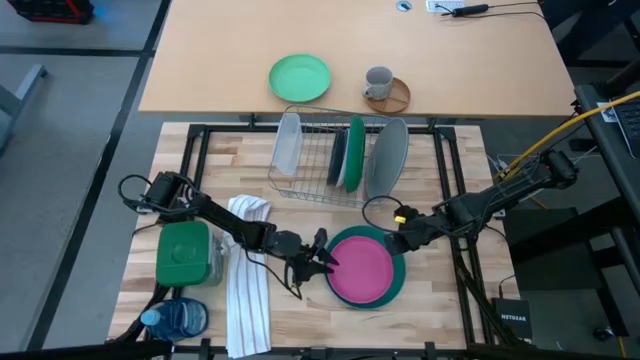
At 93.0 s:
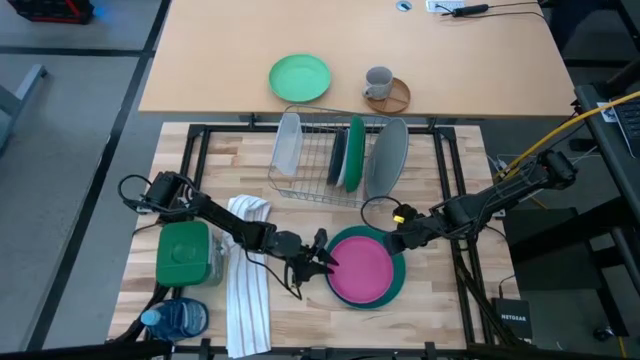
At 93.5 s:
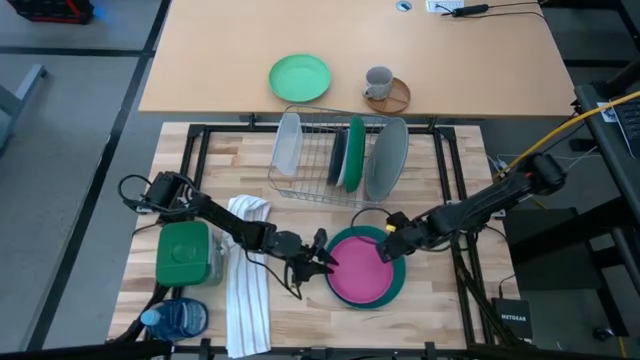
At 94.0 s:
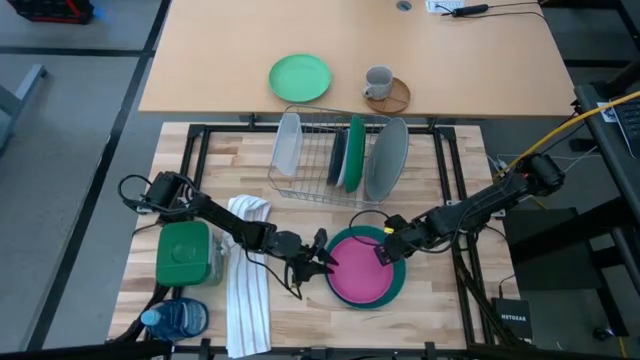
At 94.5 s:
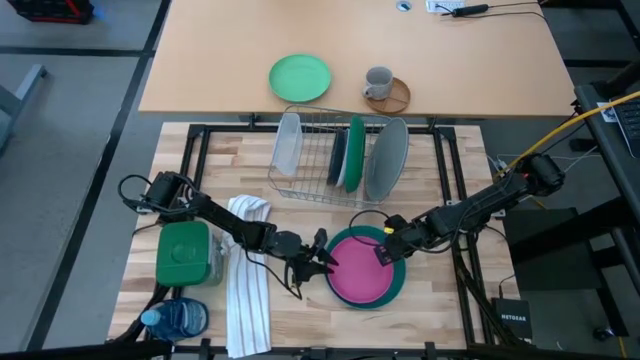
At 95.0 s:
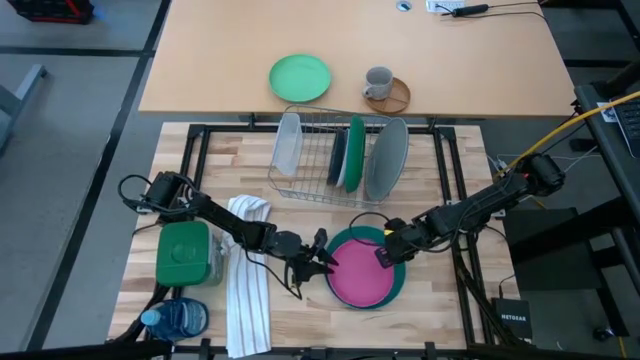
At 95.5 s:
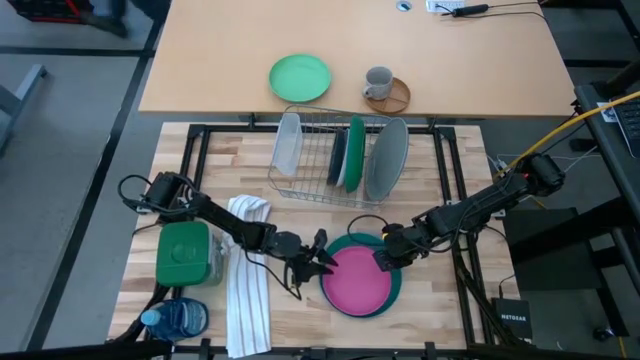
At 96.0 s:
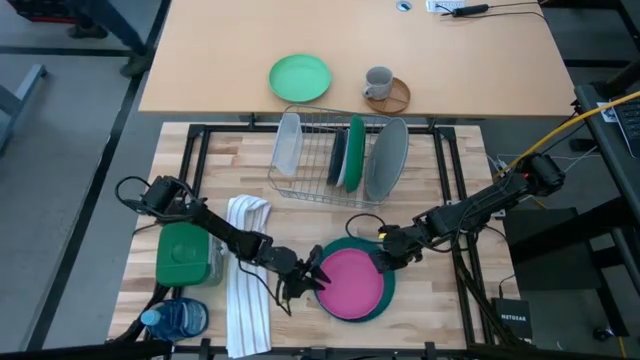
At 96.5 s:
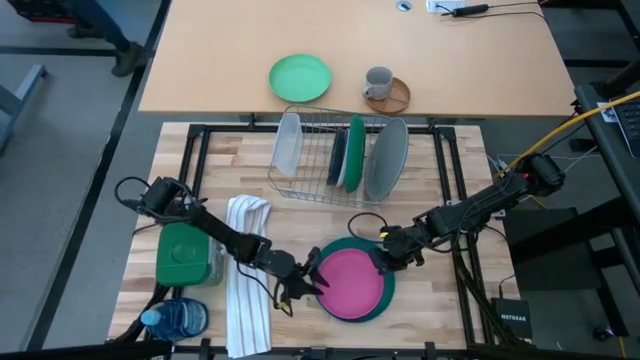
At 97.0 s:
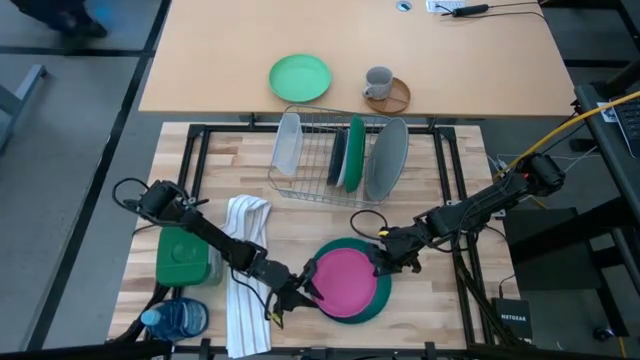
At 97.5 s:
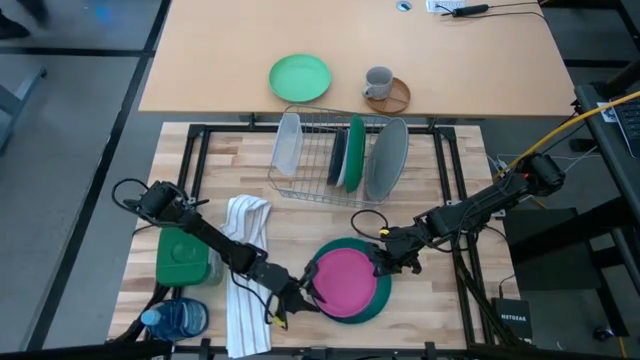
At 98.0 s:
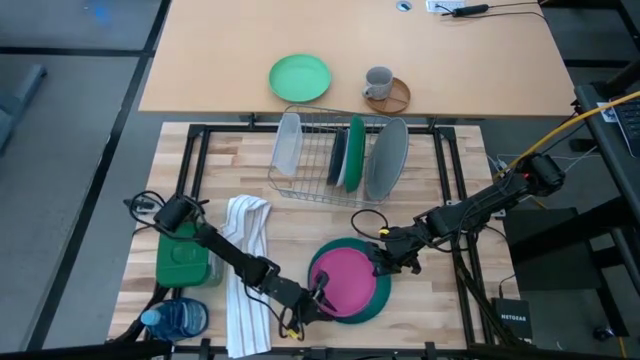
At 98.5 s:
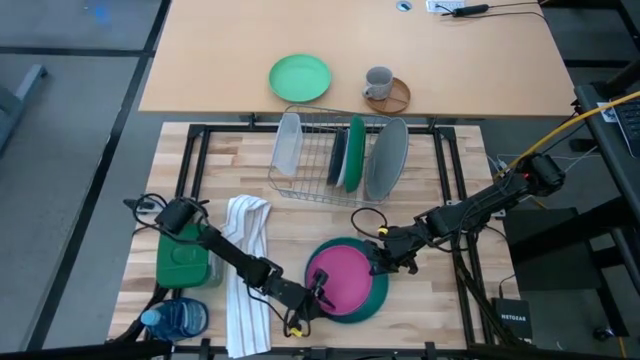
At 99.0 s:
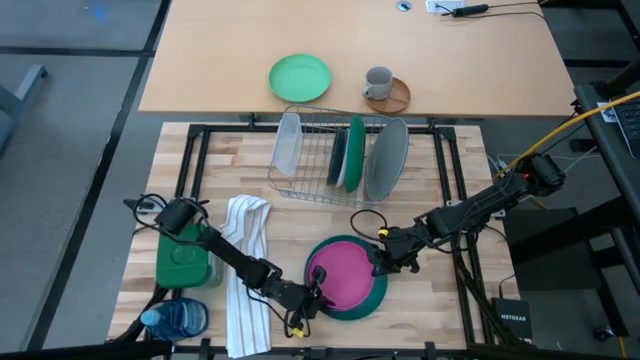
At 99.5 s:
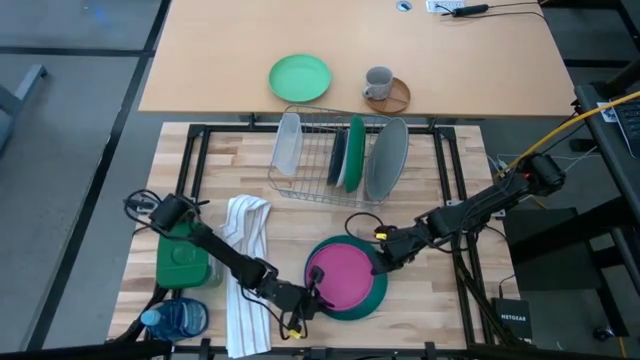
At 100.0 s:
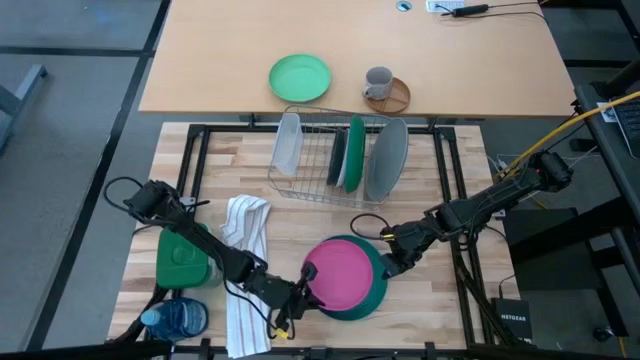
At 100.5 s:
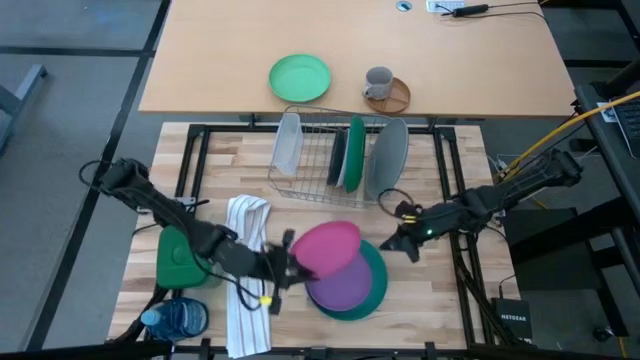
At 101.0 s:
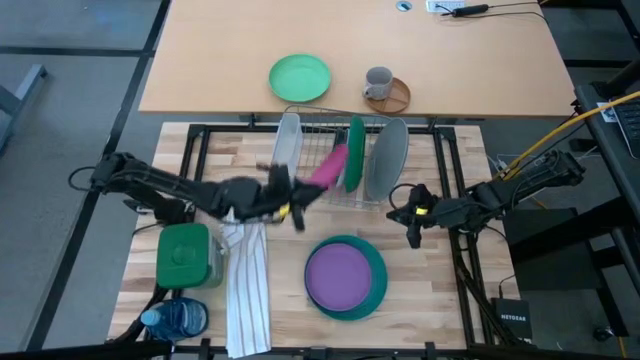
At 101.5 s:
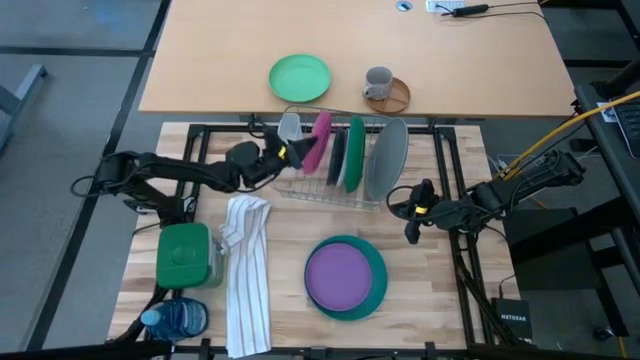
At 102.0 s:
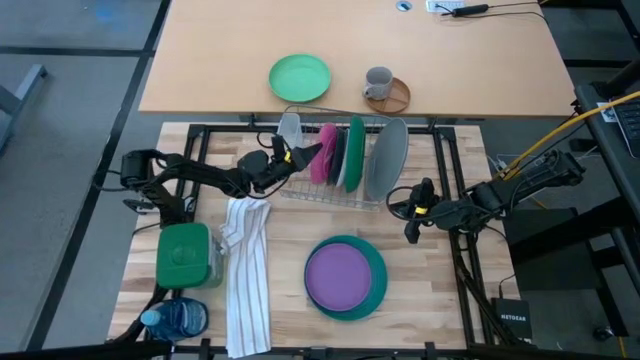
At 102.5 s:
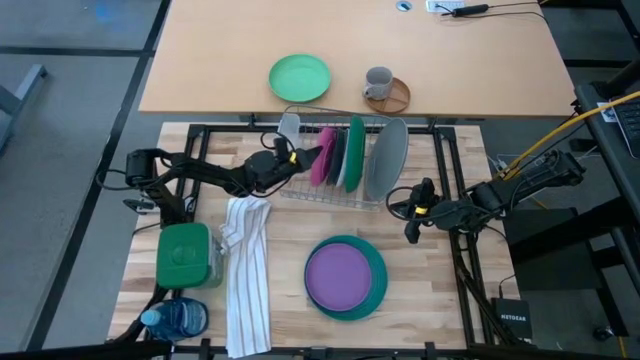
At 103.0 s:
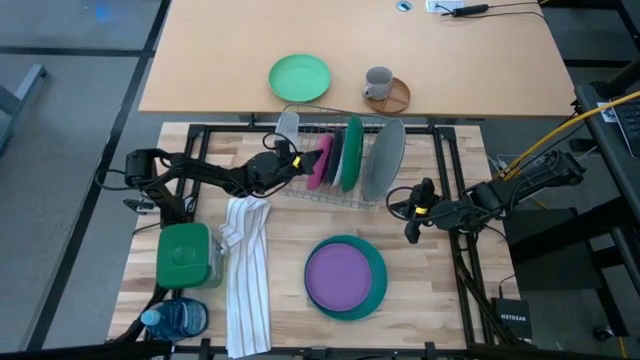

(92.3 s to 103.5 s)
Task: Sort dishes
Put the pink plate in the dish rack

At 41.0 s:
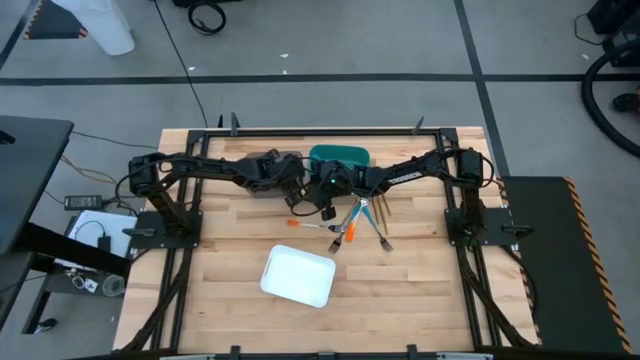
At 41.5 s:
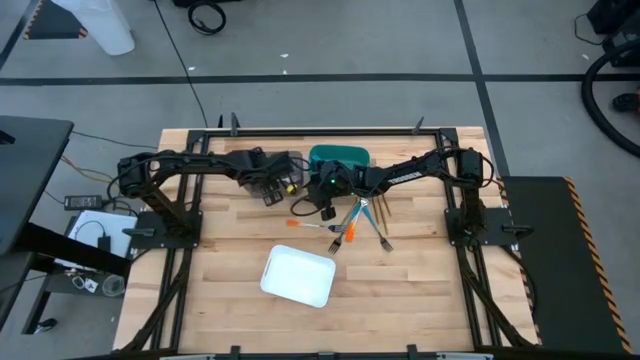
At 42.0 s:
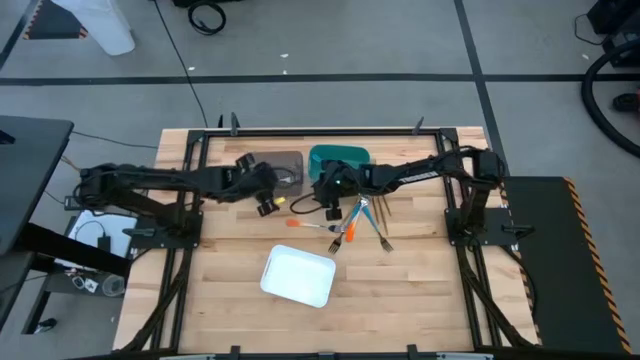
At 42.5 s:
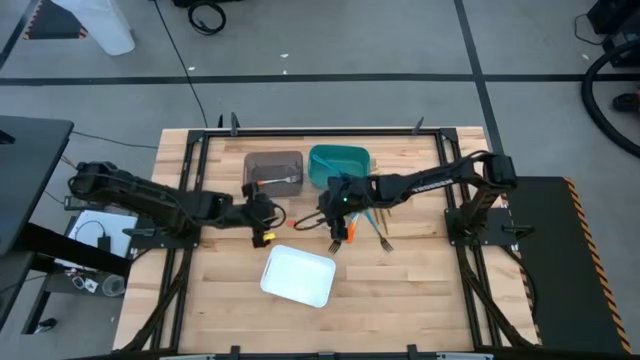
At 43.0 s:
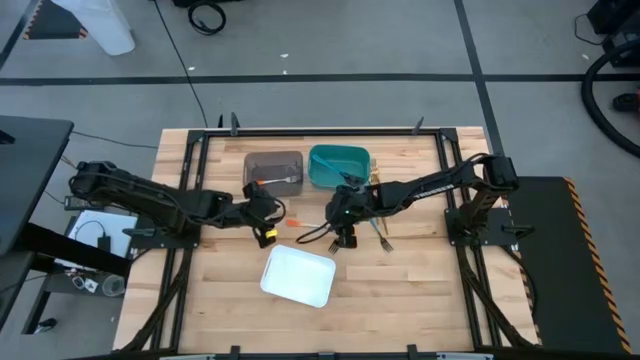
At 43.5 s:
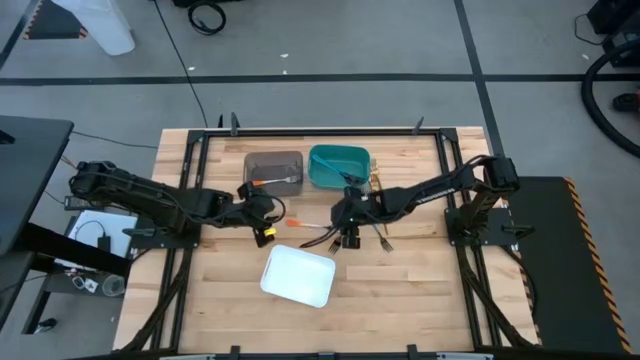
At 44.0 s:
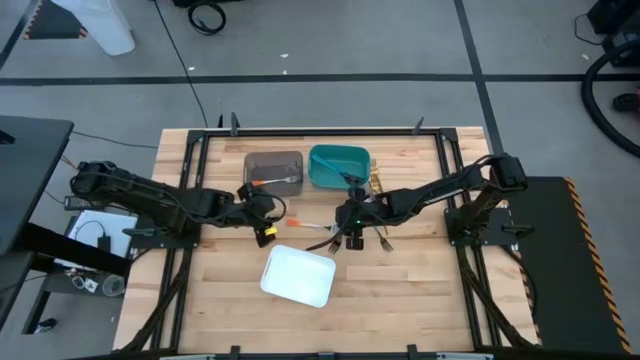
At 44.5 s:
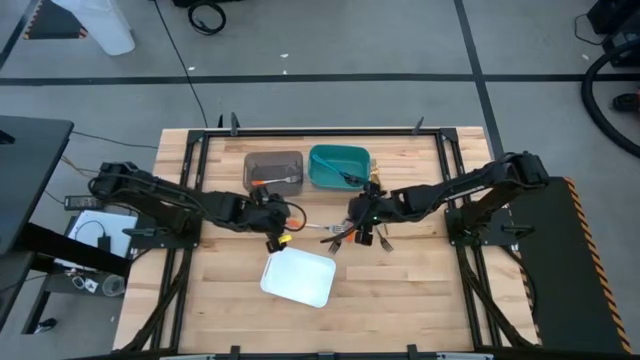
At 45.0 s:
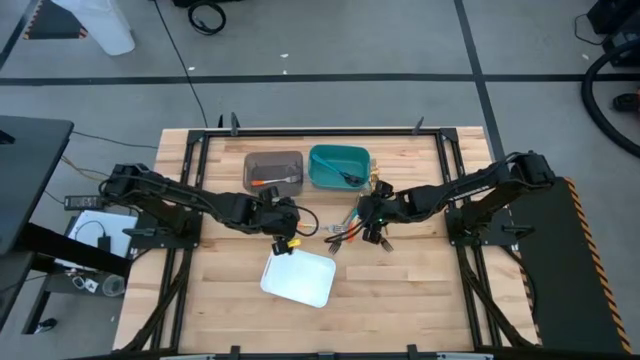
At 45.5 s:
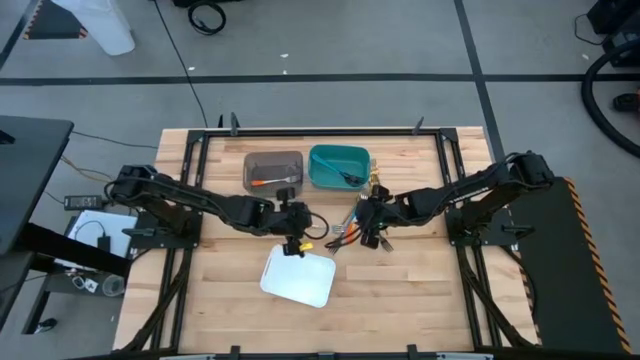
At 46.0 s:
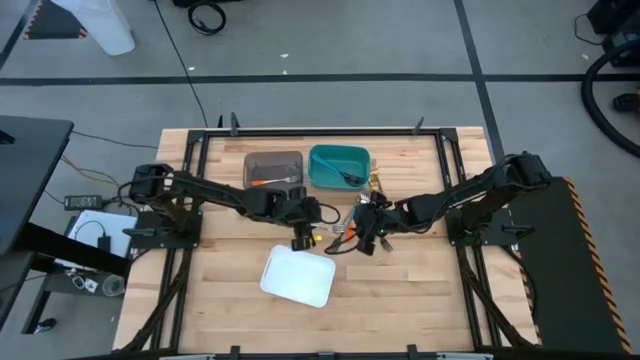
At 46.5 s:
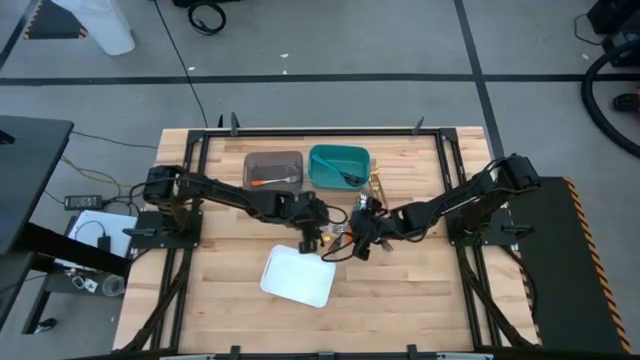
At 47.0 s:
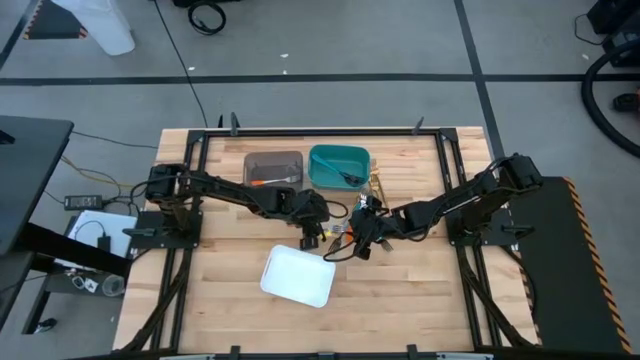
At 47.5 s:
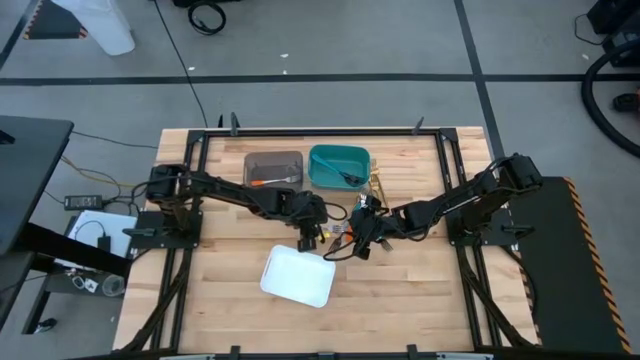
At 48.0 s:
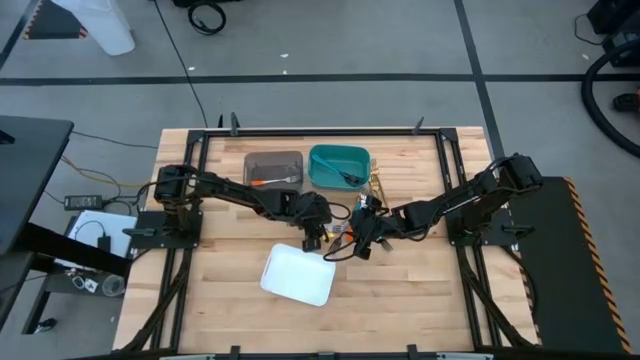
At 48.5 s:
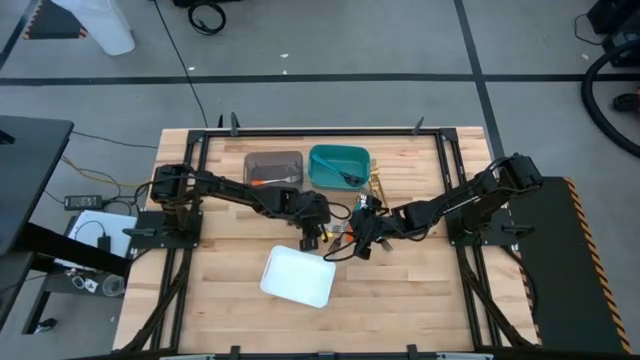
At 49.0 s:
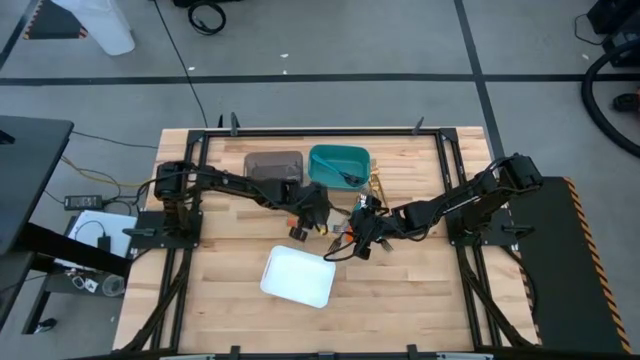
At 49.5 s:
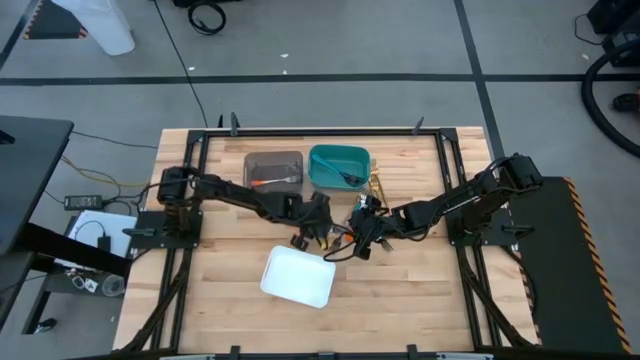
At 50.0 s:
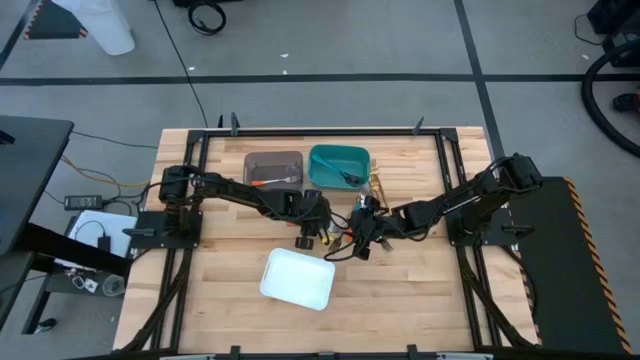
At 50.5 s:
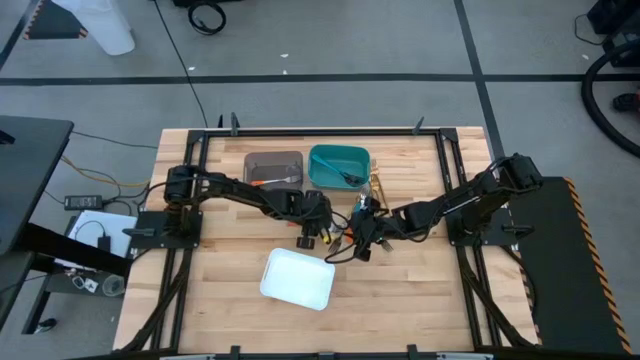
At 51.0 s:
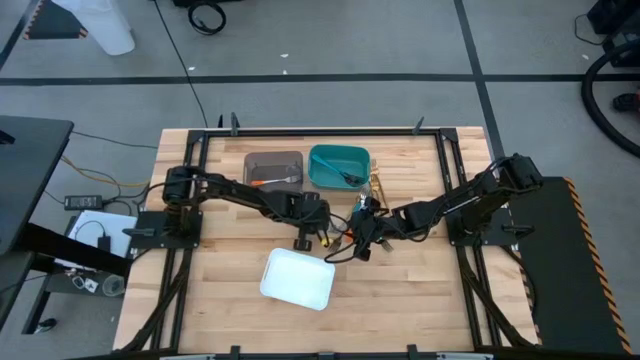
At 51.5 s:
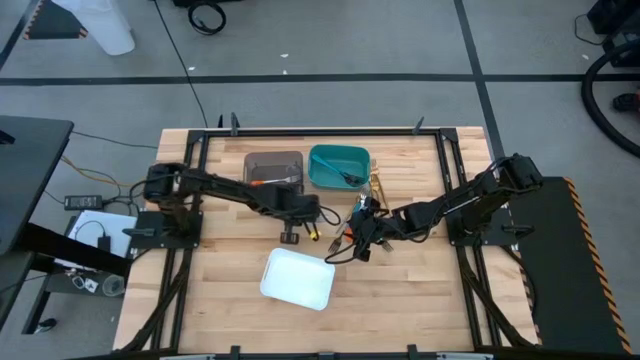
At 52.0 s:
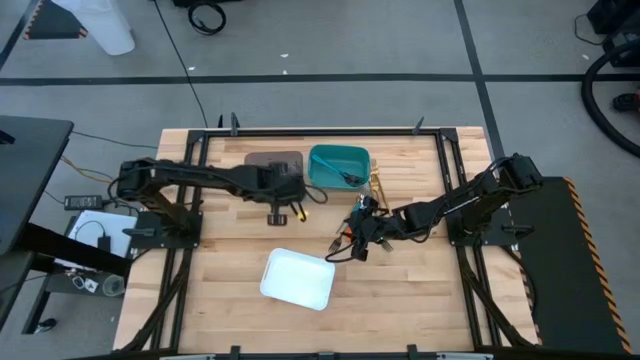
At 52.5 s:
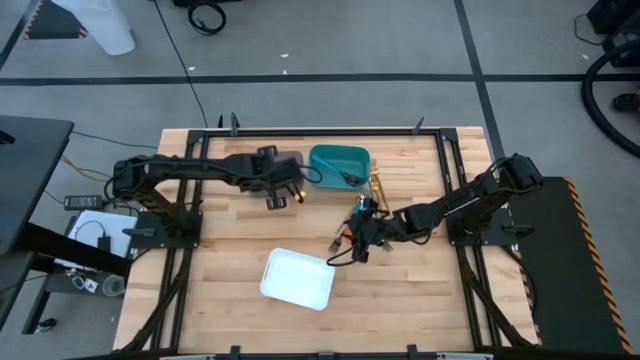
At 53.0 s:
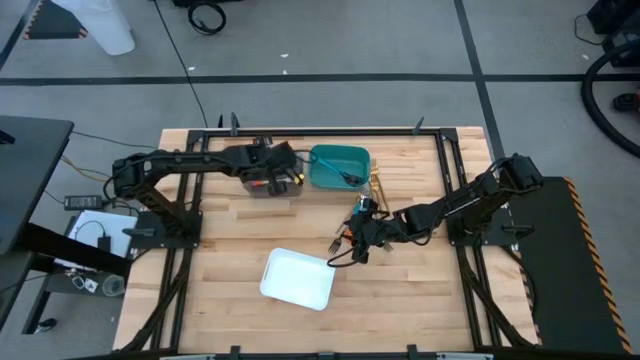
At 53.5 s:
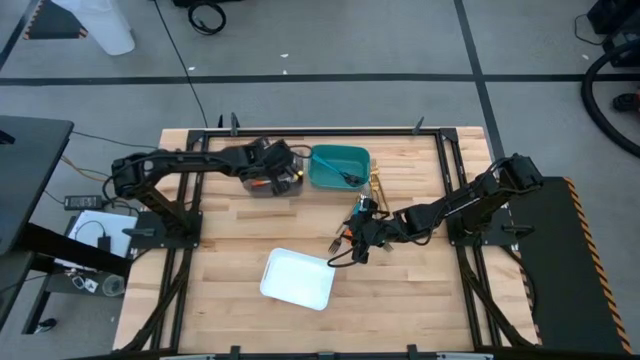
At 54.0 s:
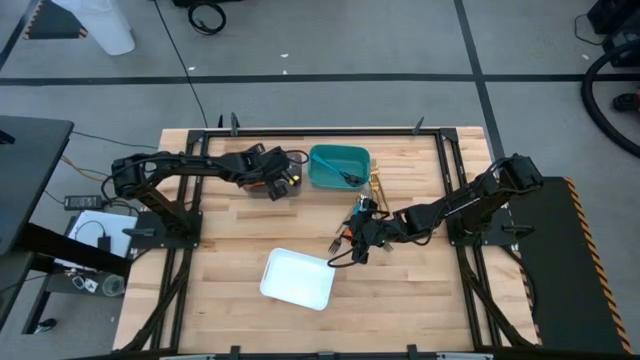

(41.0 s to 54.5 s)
Task: Sort silverware by color (type)
Put the orange fork into the black bin
